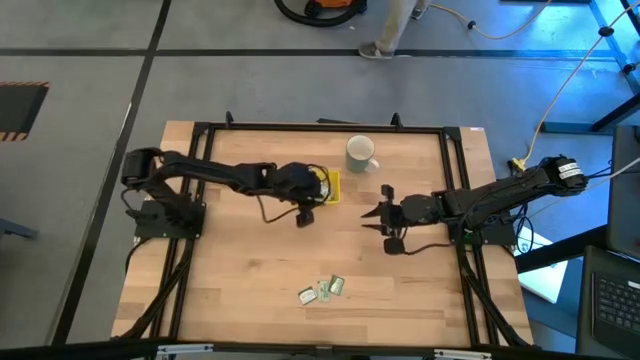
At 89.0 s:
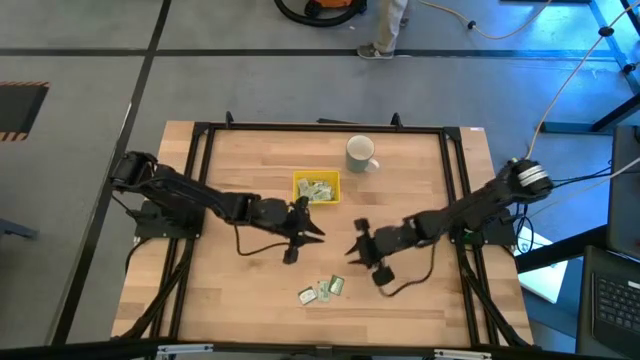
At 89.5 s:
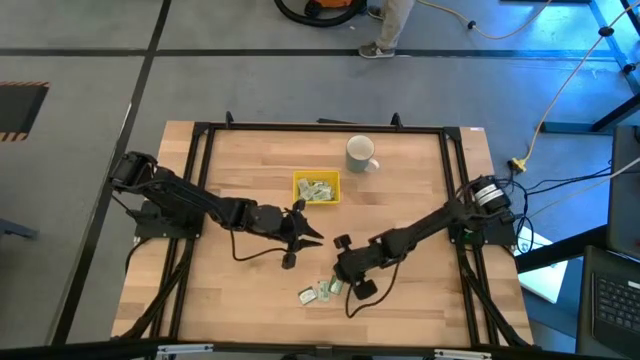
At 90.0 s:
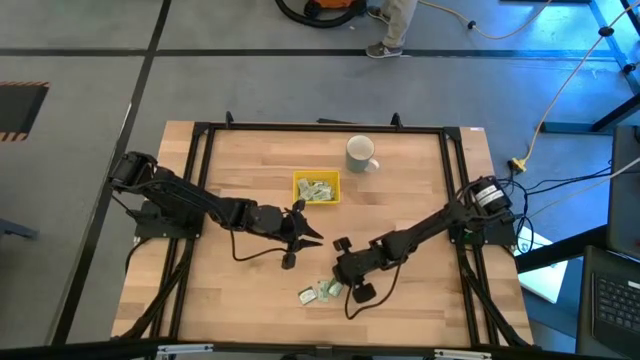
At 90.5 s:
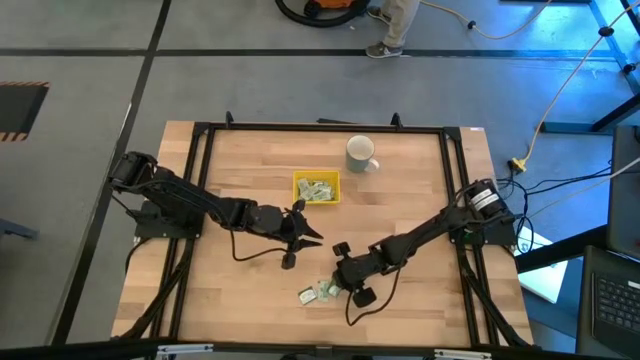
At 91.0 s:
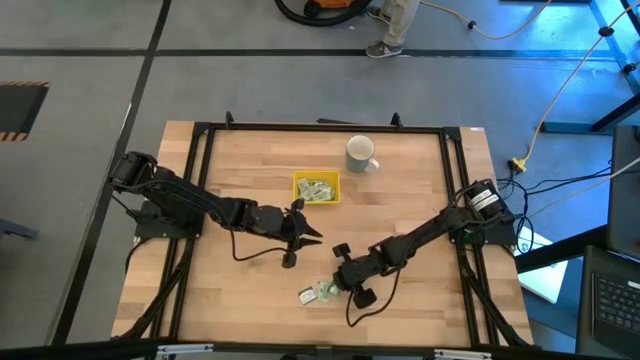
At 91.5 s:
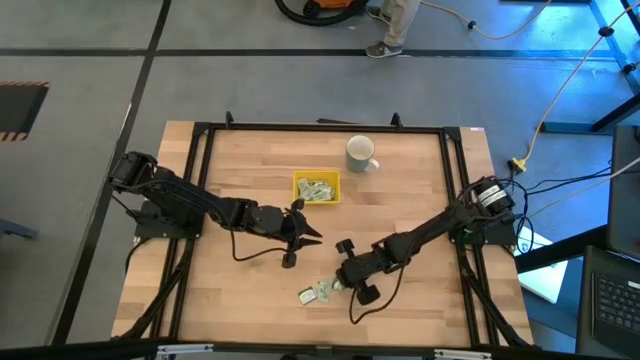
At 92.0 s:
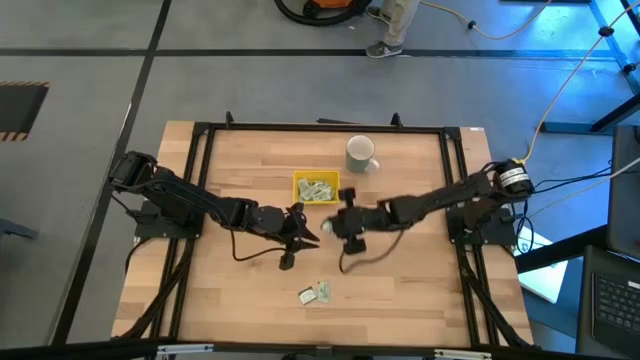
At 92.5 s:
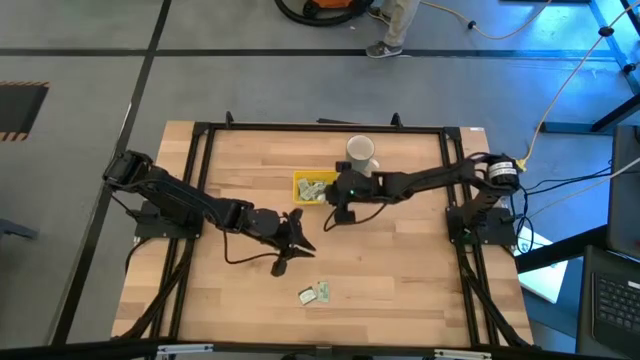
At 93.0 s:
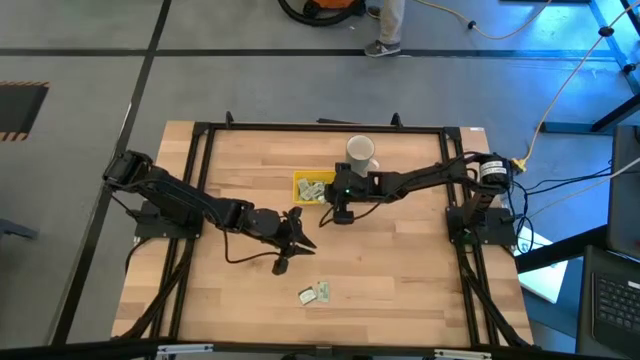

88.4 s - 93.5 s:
Task: Pick and place Stevia / Truvia into bins
Put the right truvia tea packet into the yellow bin

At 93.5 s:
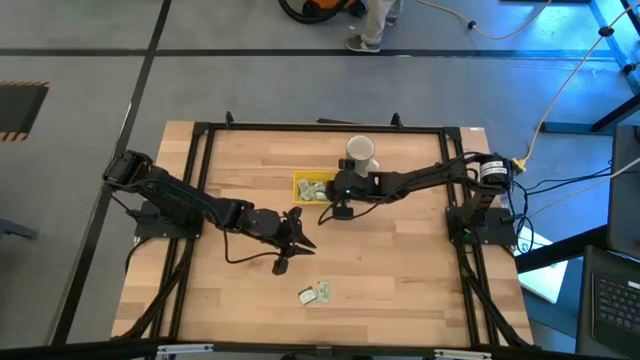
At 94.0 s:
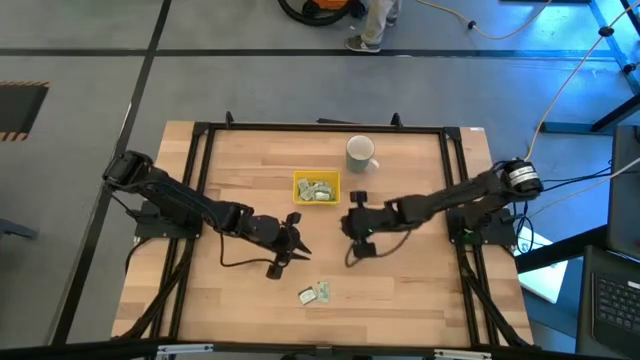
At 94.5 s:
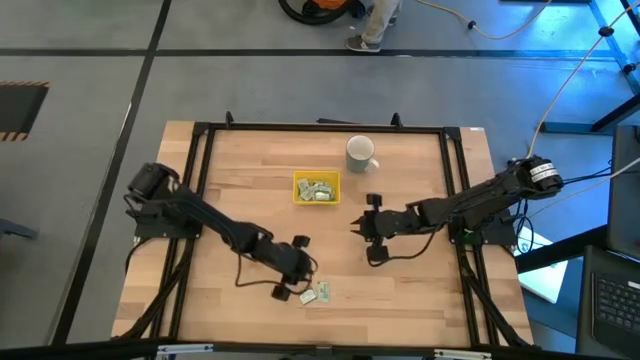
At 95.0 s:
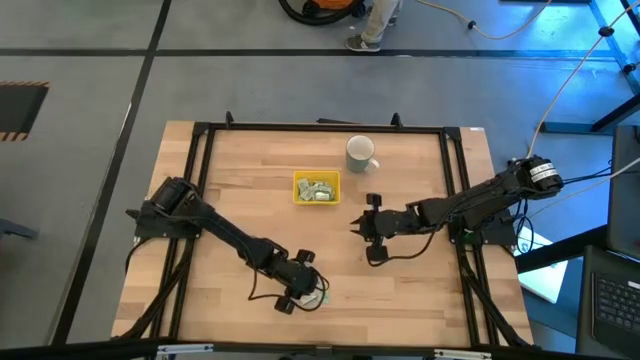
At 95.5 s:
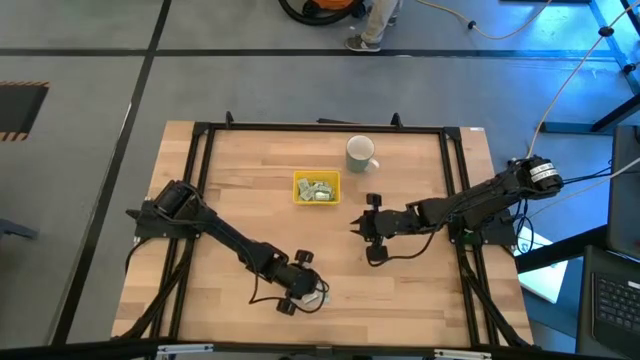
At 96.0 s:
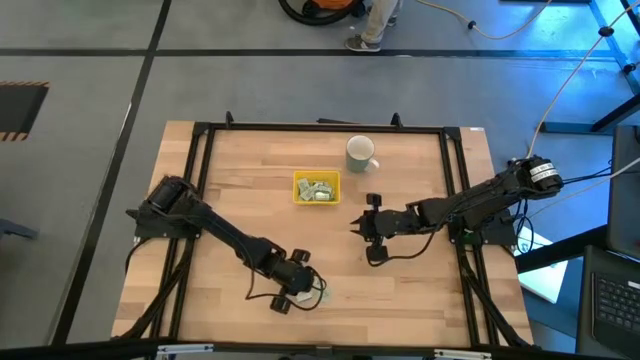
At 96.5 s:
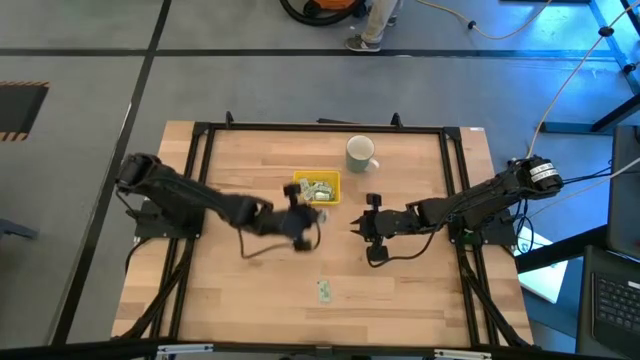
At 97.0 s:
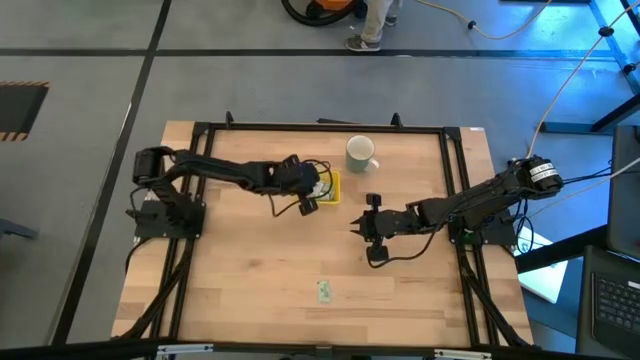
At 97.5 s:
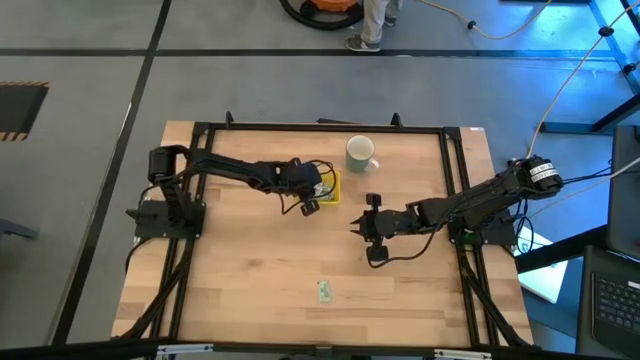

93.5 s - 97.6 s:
Put the truvia tea packet into the yellow bin

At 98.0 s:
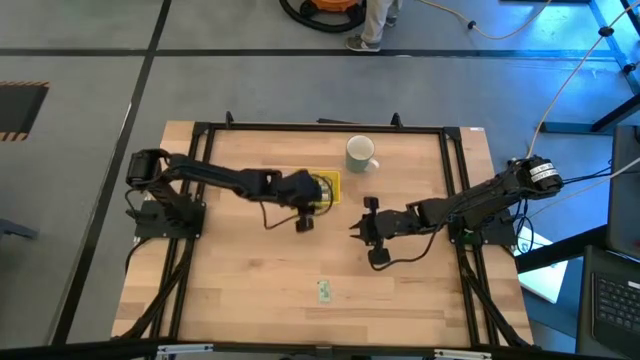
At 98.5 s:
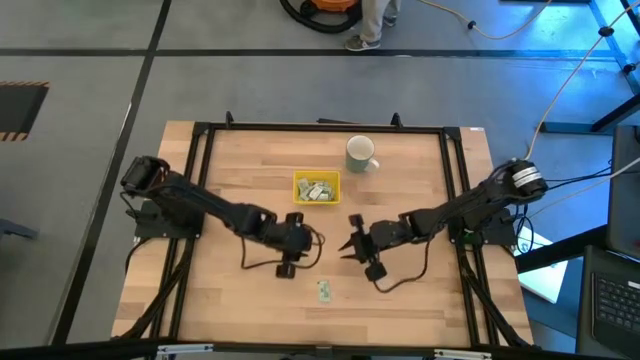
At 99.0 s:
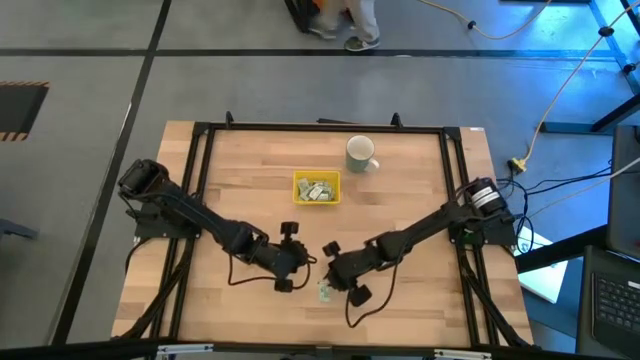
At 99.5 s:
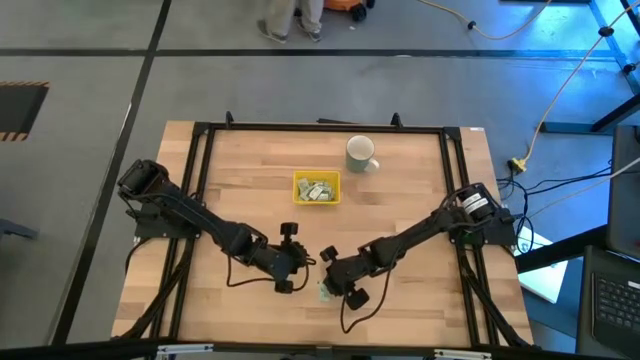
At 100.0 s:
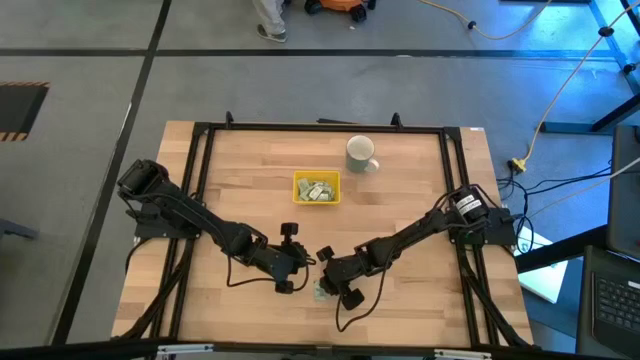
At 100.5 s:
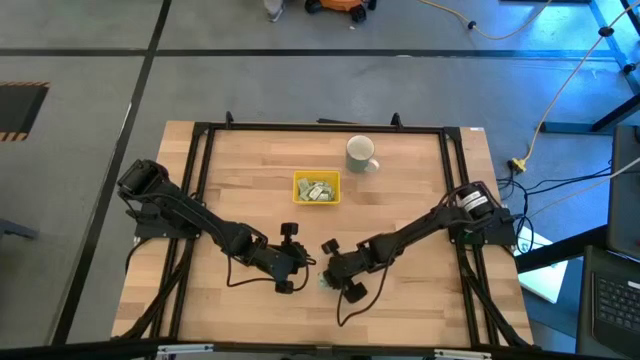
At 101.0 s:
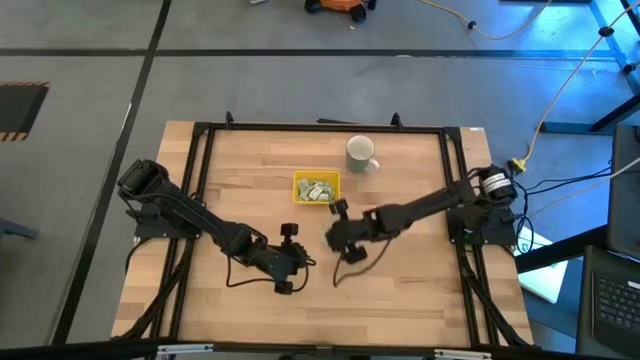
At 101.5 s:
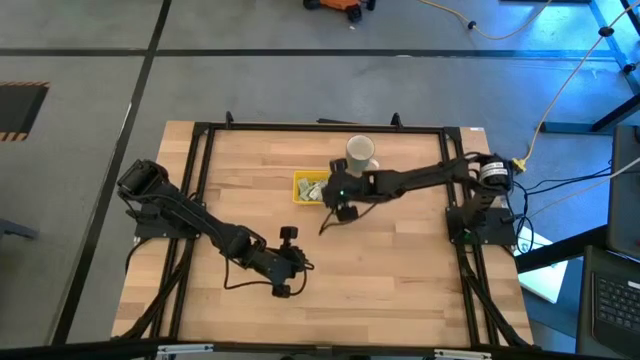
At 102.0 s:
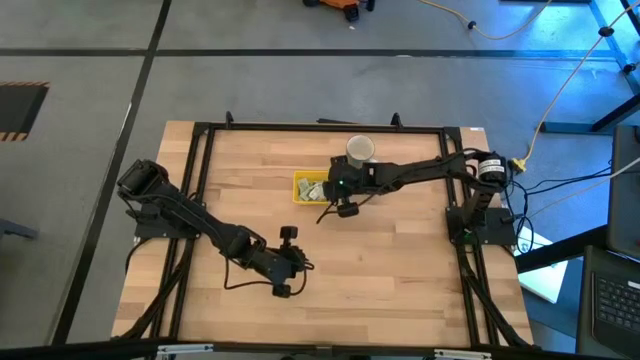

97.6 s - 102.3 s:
Put the stevia tea packet into the yellow bin

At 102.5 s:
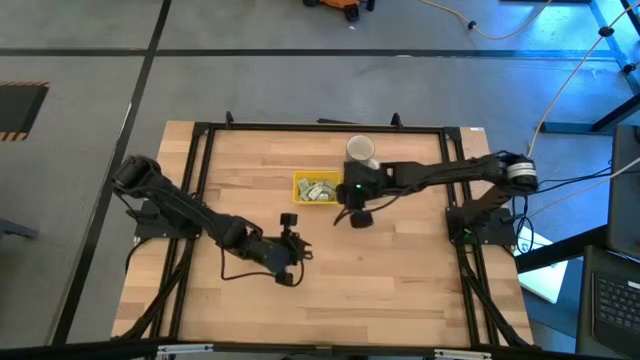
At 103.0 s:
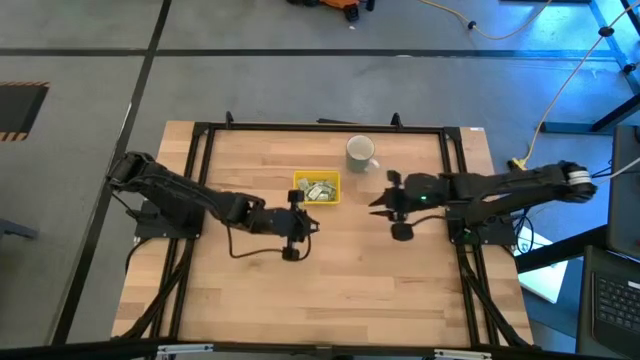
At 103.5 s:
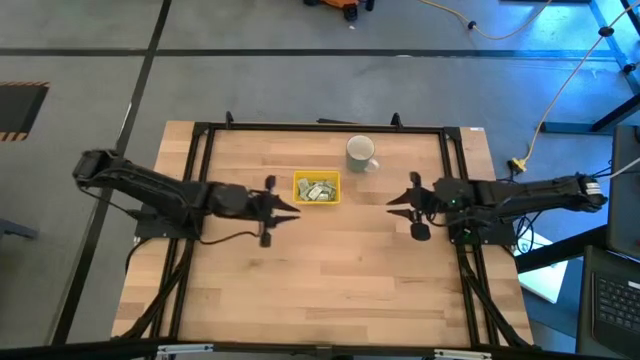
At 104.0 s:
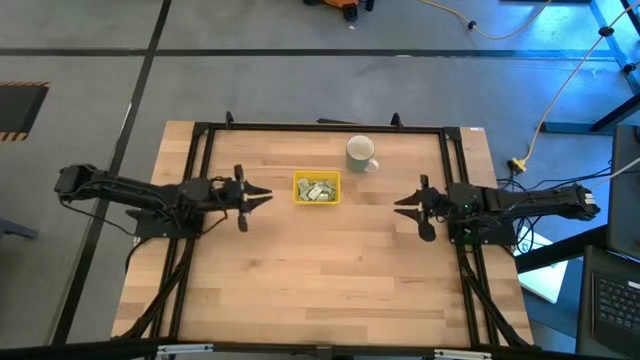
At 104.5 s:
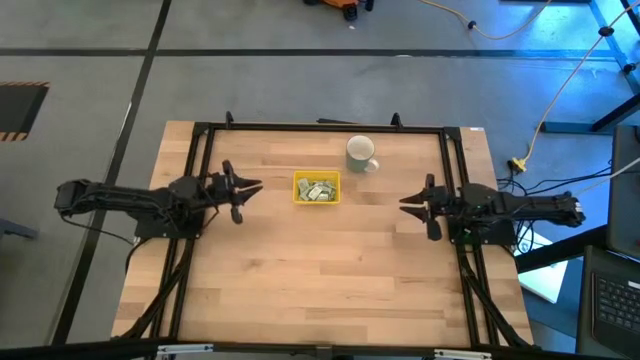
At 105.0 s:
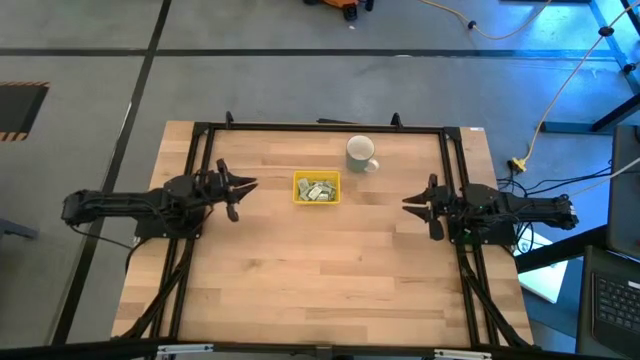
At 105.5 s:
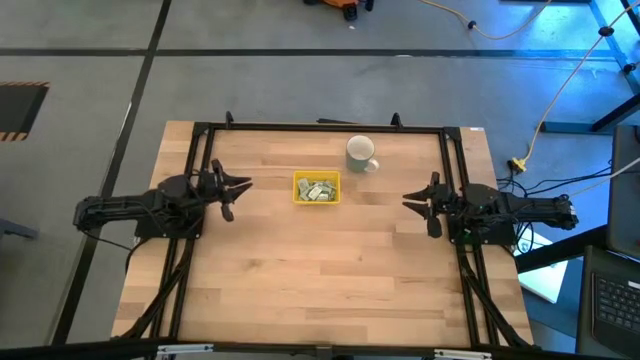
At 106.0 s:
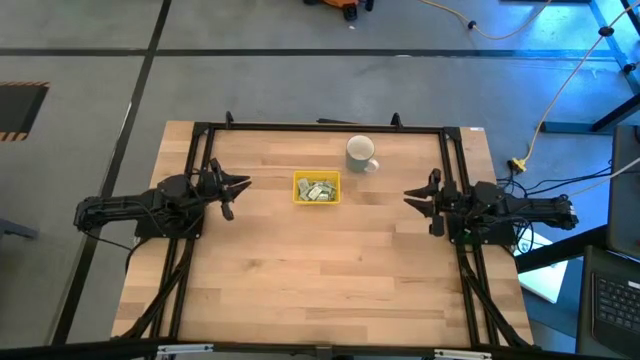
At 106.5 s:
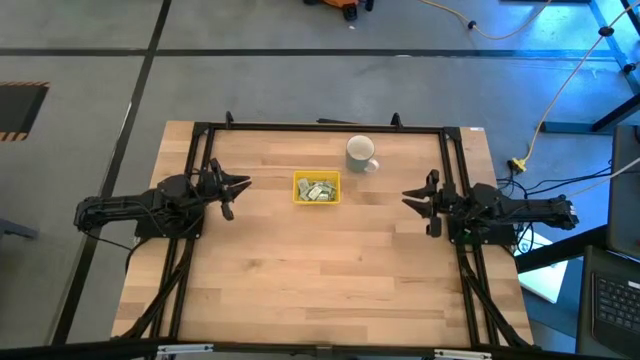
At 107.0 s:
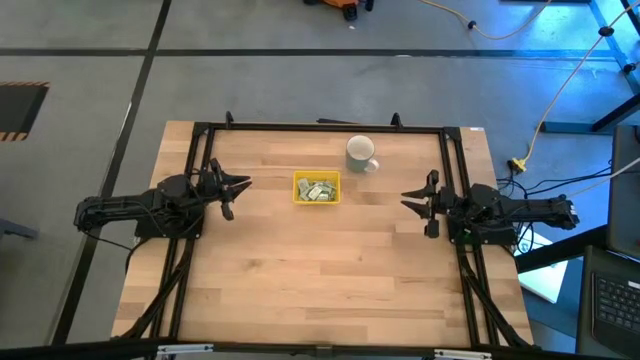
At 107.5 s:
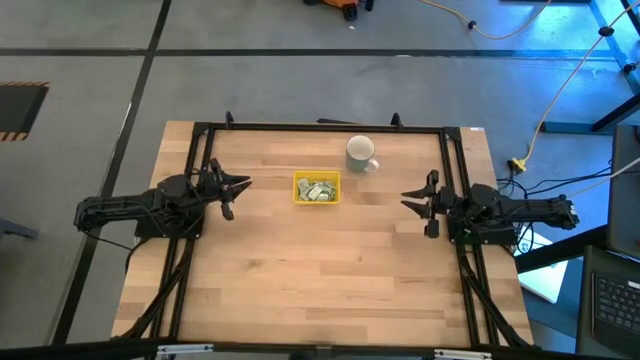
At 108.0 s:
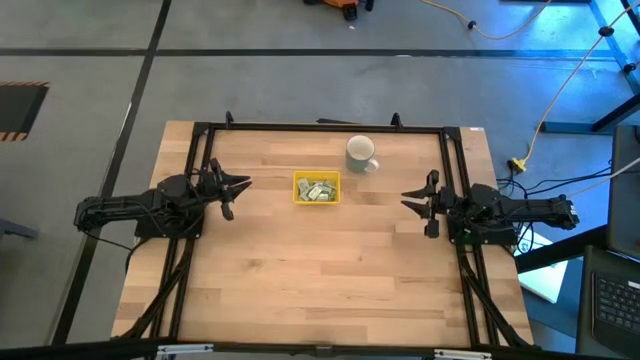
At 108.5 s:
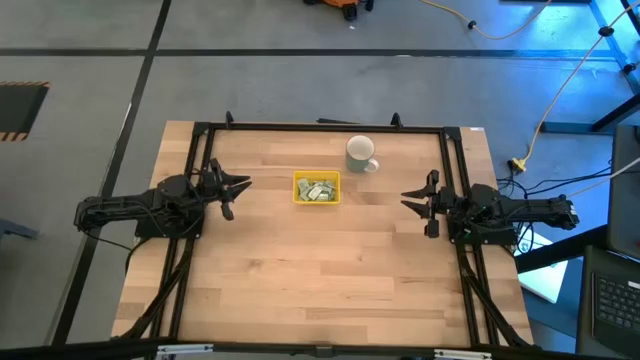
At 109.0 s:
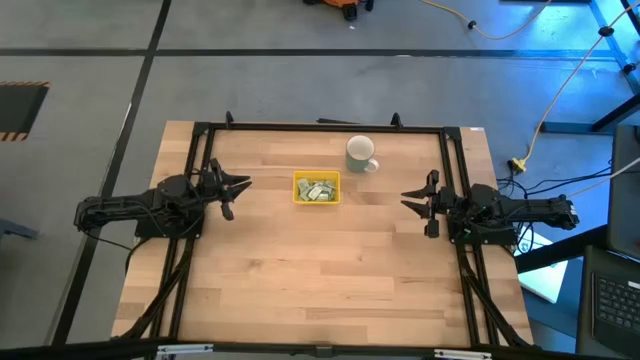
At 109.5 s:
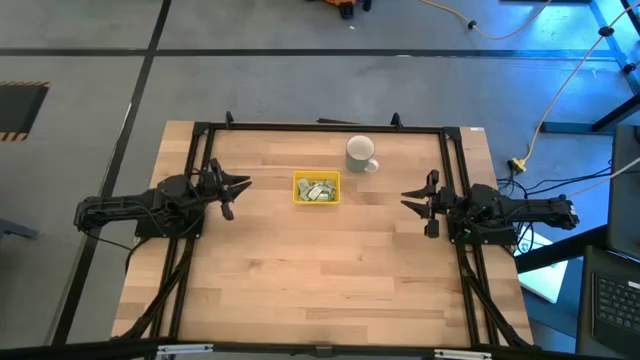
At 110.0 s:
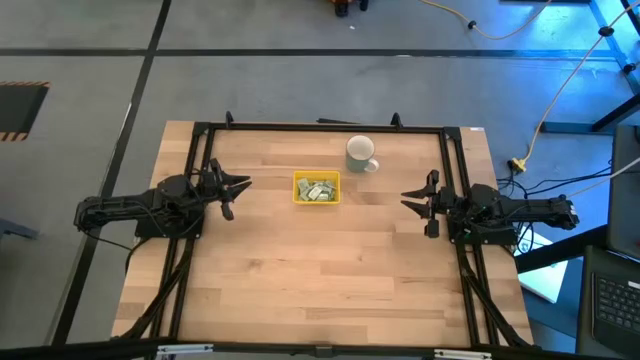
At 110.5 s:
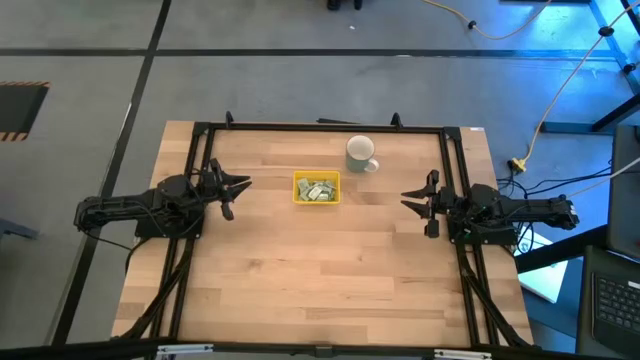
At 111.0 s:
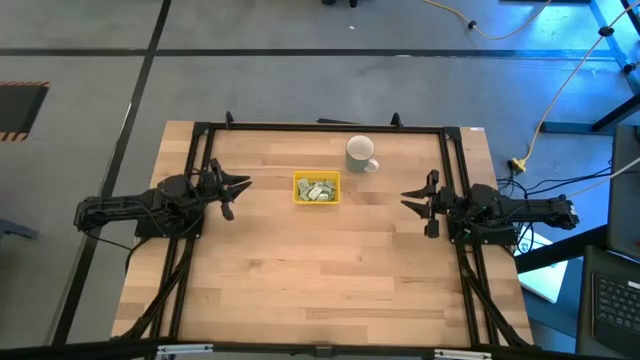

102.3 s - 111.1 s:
Return to Home Position
